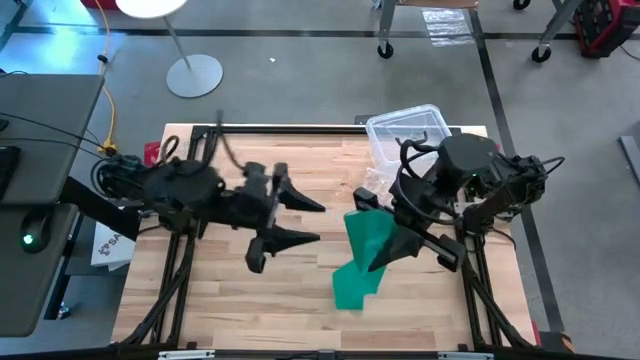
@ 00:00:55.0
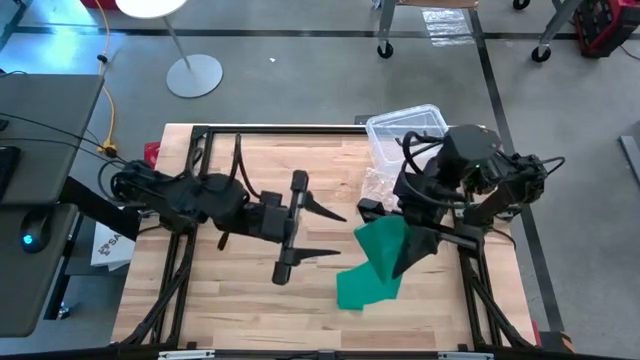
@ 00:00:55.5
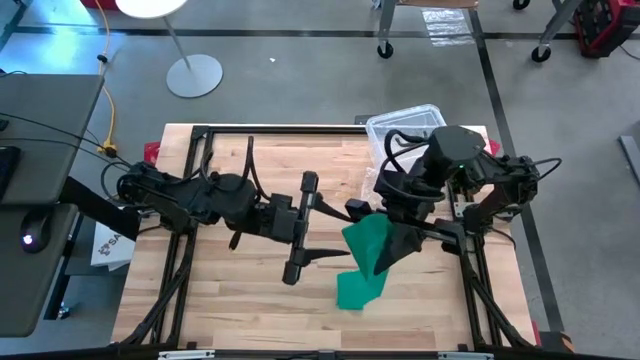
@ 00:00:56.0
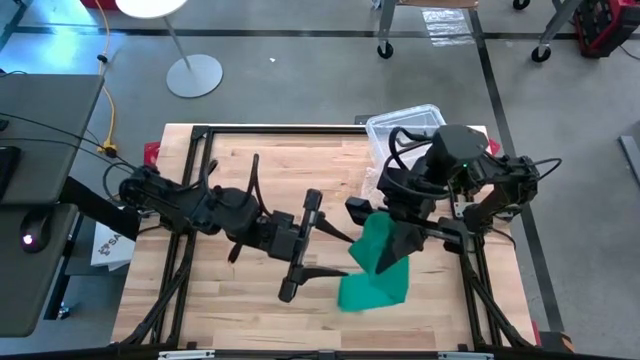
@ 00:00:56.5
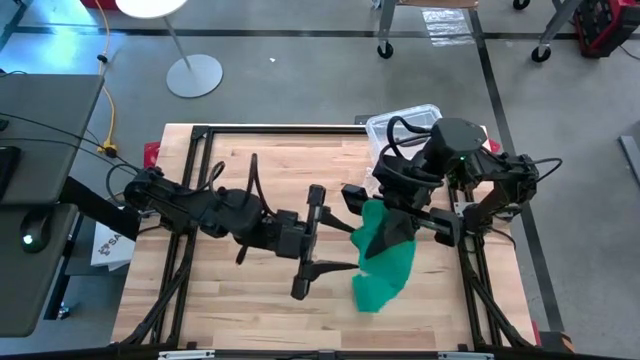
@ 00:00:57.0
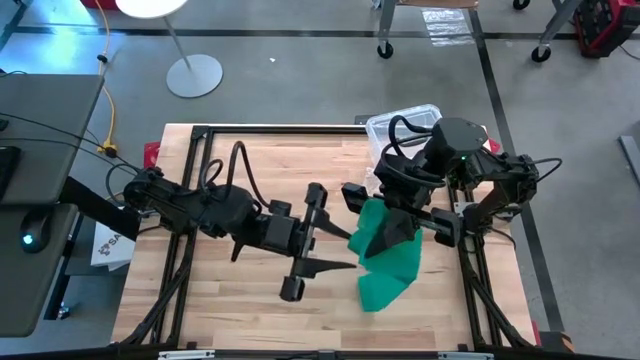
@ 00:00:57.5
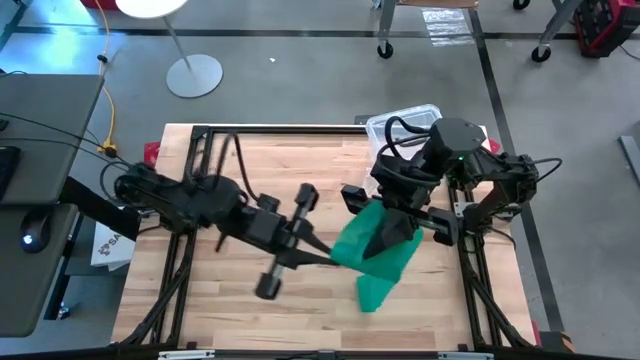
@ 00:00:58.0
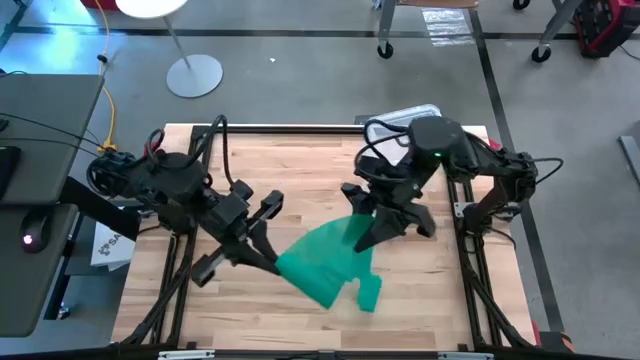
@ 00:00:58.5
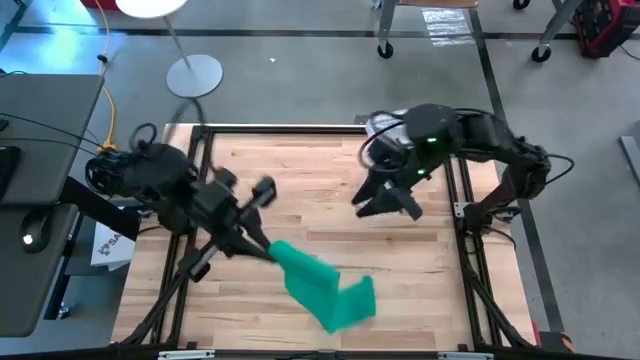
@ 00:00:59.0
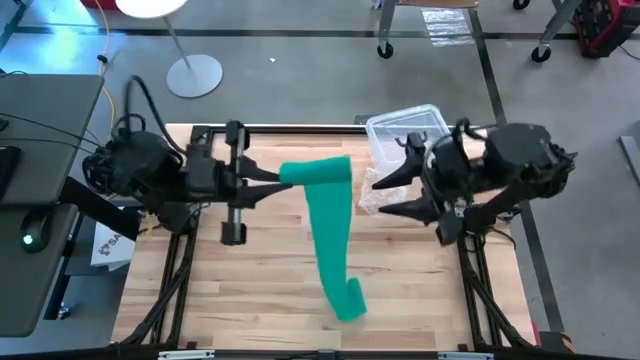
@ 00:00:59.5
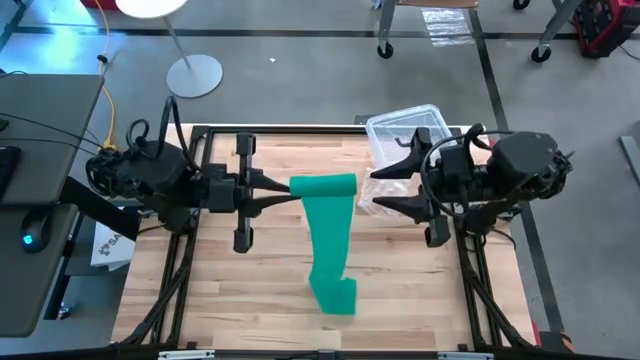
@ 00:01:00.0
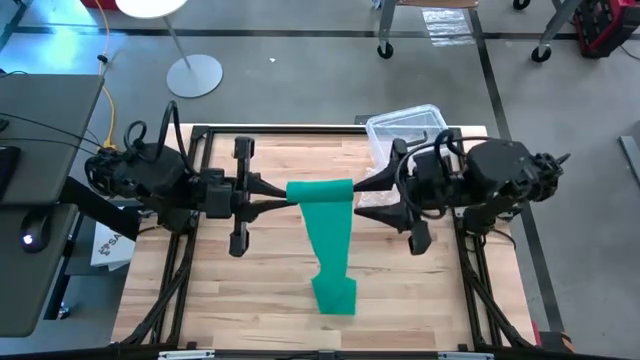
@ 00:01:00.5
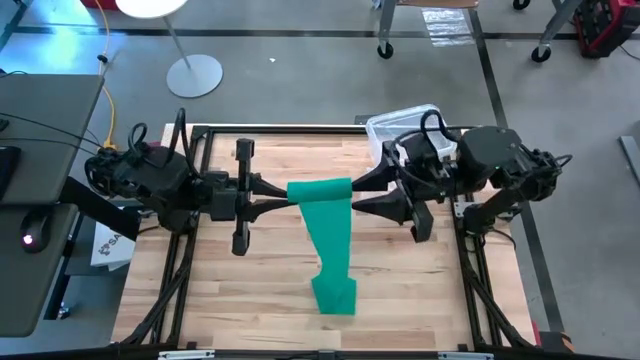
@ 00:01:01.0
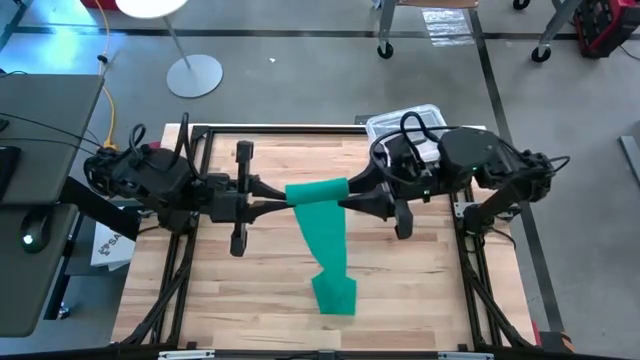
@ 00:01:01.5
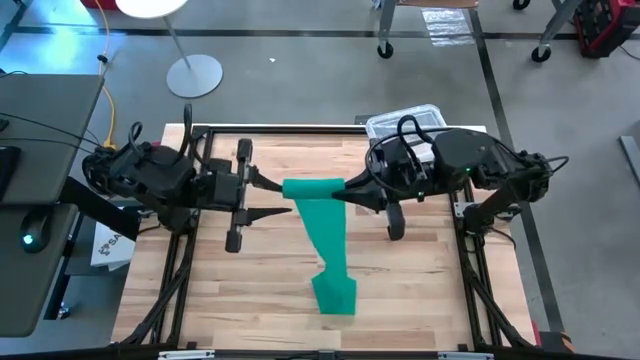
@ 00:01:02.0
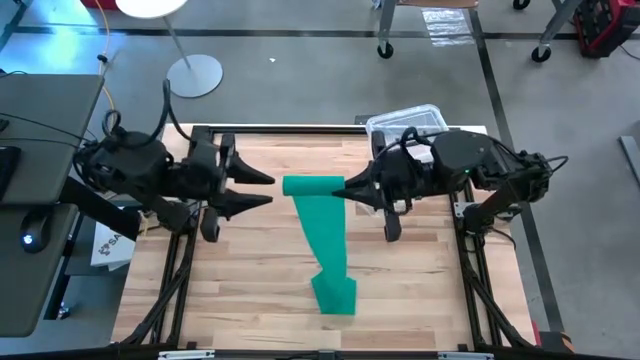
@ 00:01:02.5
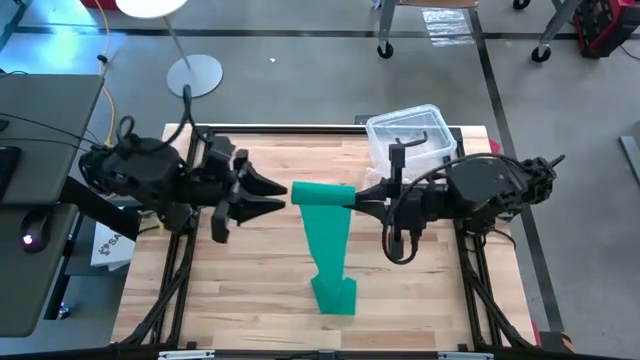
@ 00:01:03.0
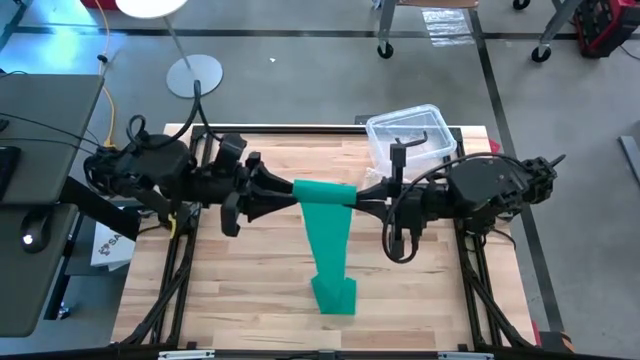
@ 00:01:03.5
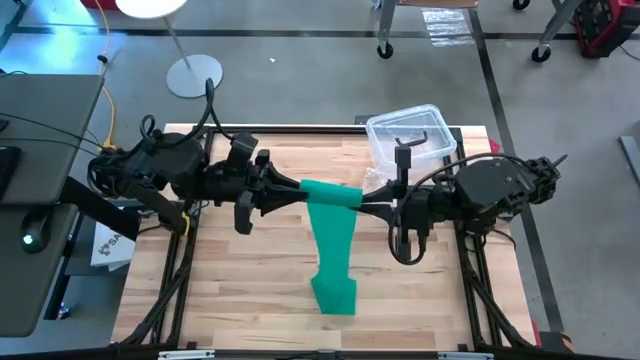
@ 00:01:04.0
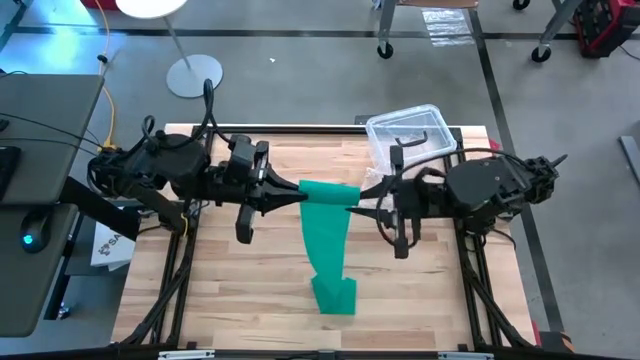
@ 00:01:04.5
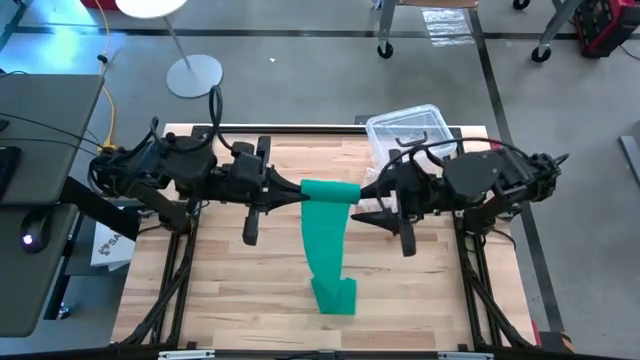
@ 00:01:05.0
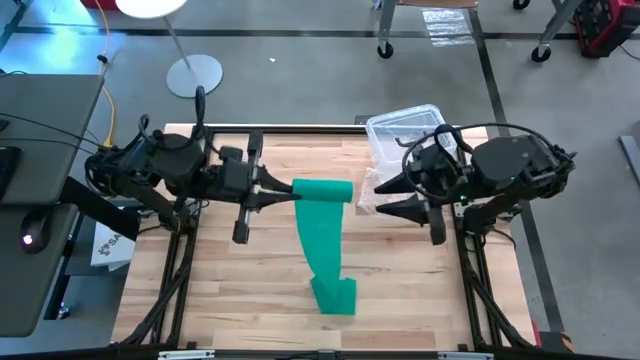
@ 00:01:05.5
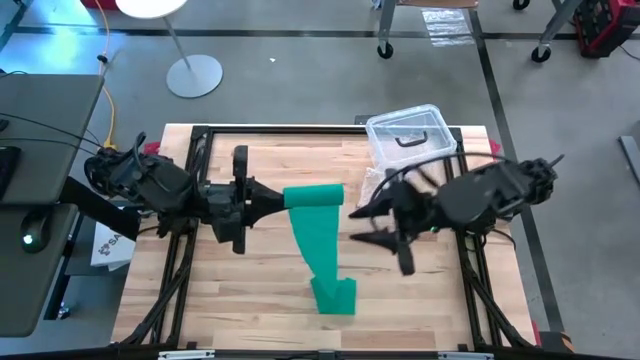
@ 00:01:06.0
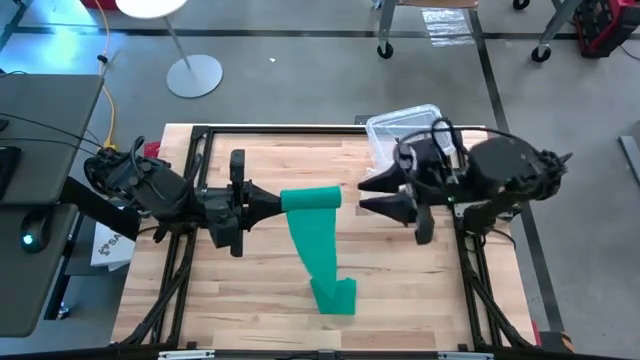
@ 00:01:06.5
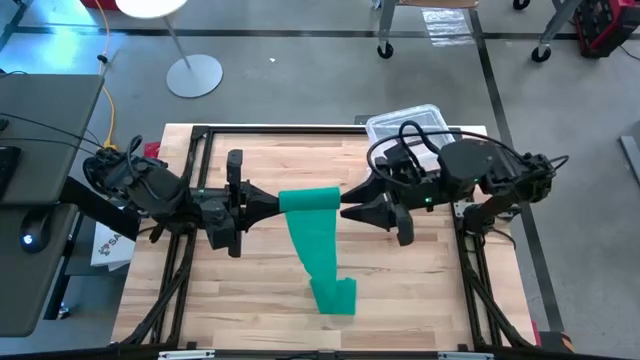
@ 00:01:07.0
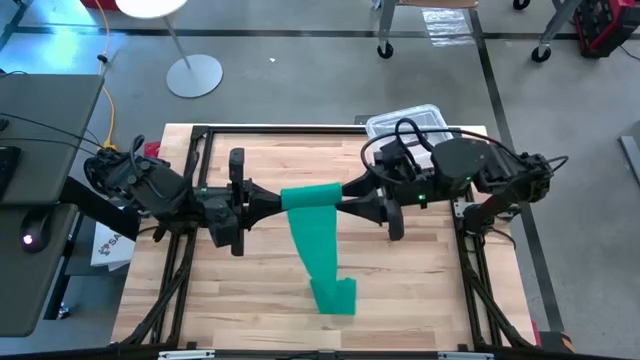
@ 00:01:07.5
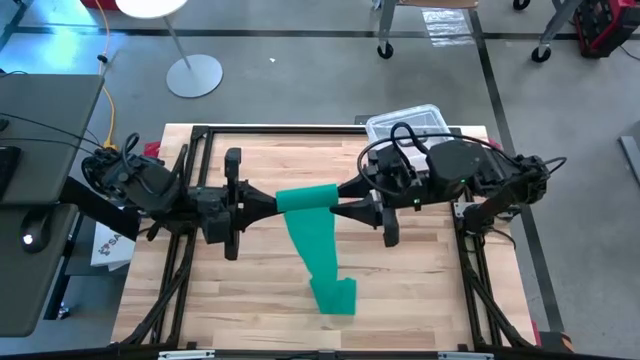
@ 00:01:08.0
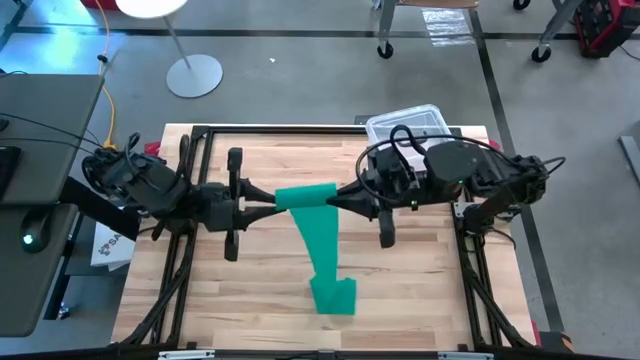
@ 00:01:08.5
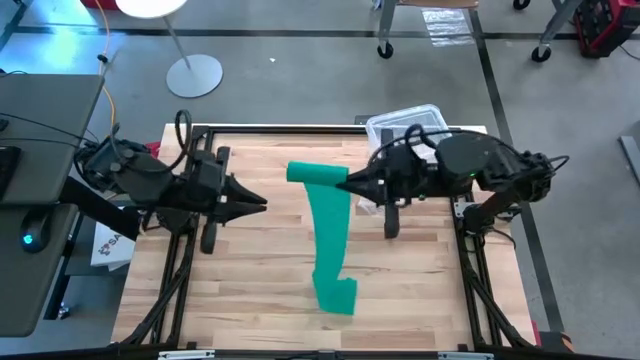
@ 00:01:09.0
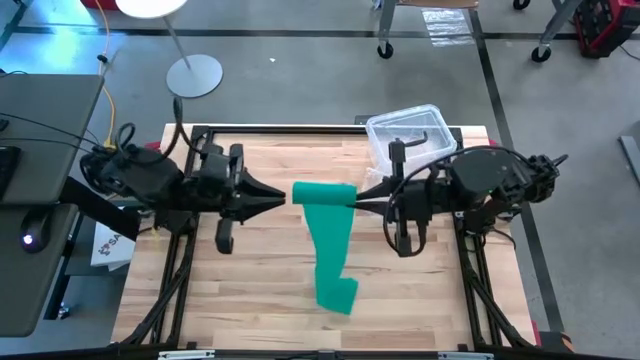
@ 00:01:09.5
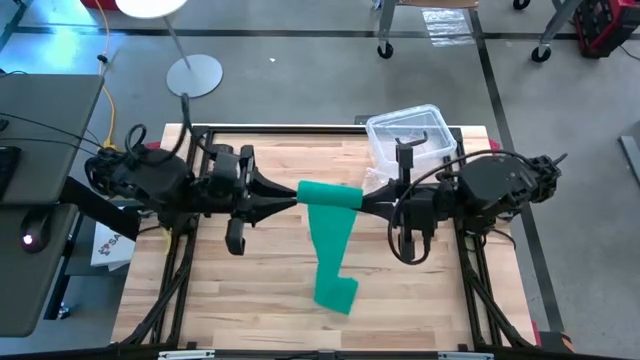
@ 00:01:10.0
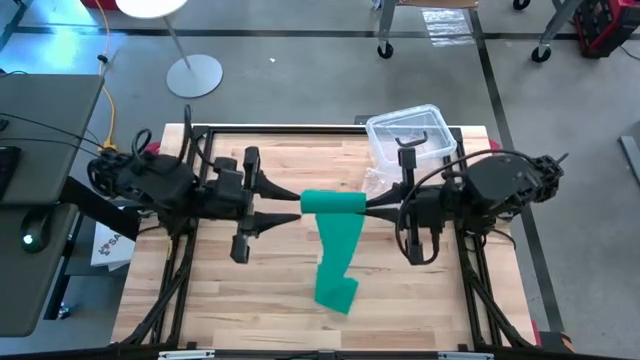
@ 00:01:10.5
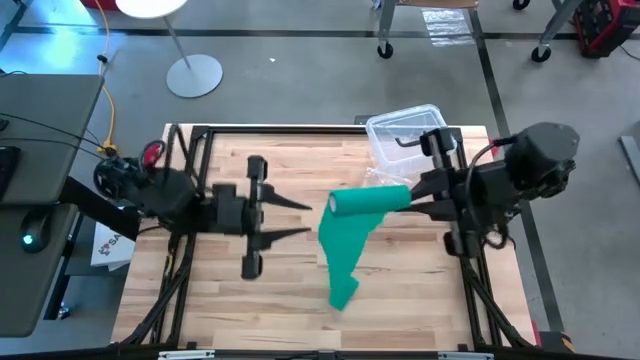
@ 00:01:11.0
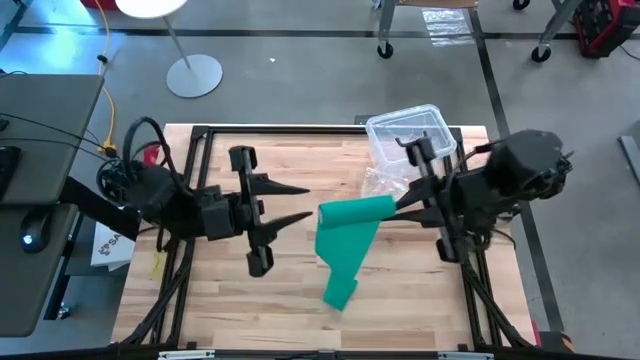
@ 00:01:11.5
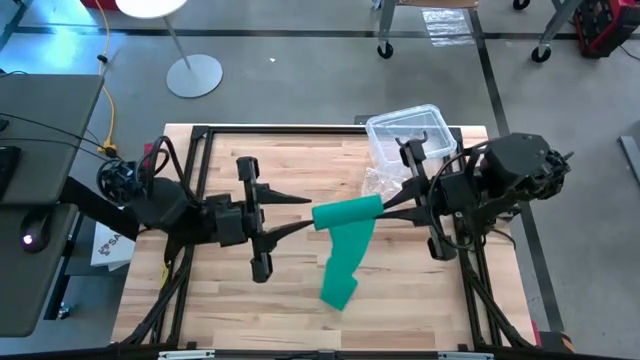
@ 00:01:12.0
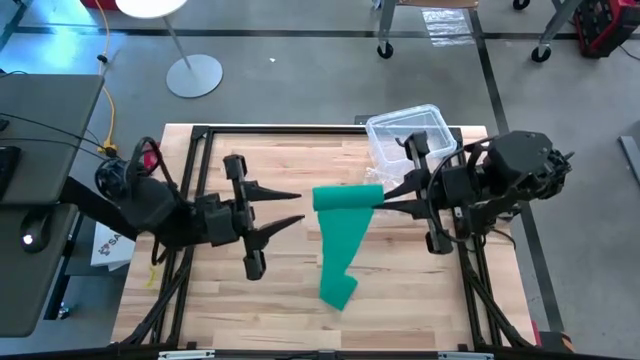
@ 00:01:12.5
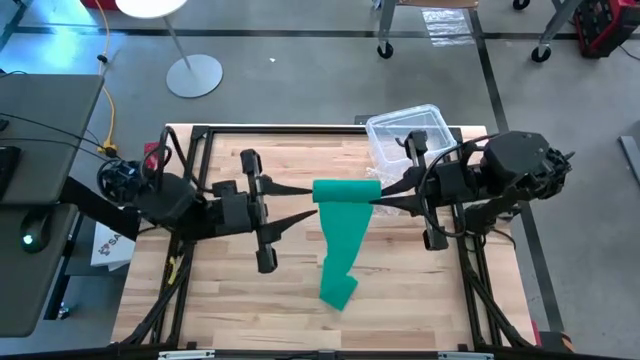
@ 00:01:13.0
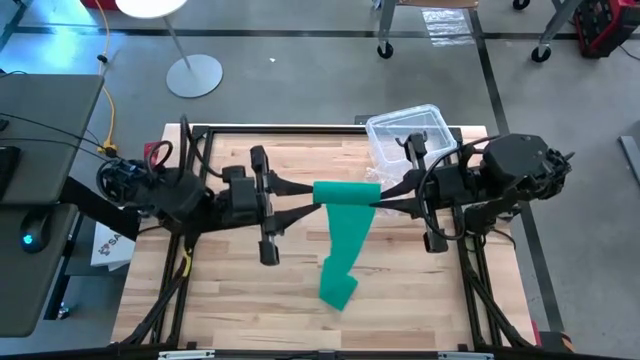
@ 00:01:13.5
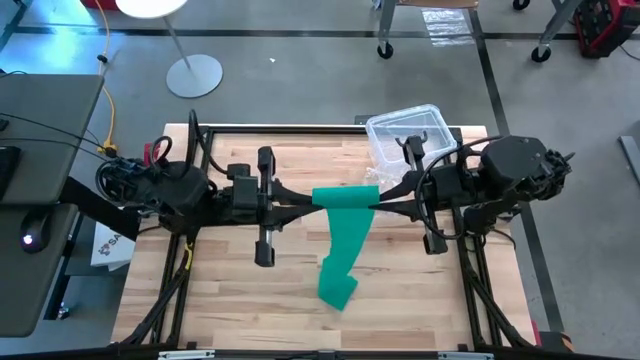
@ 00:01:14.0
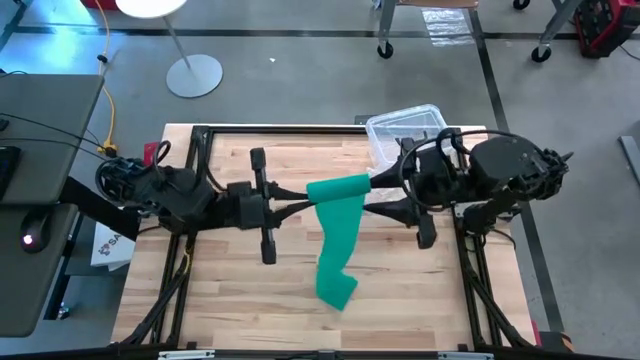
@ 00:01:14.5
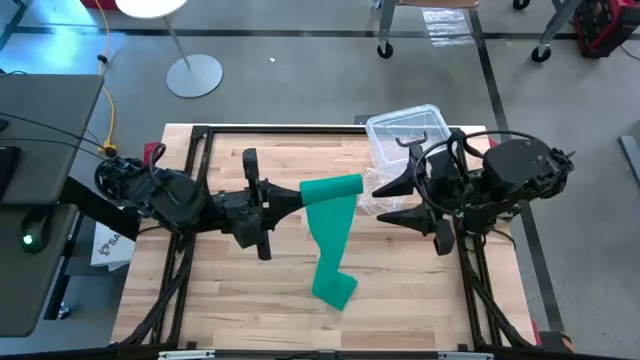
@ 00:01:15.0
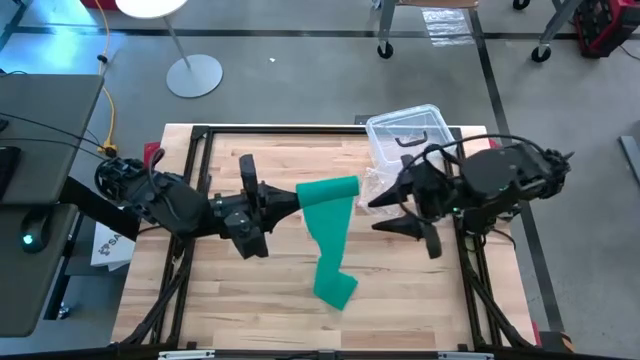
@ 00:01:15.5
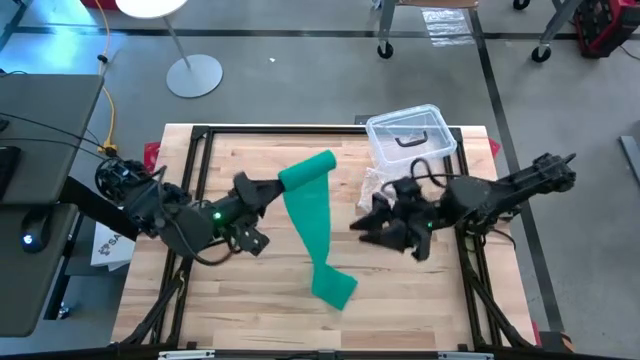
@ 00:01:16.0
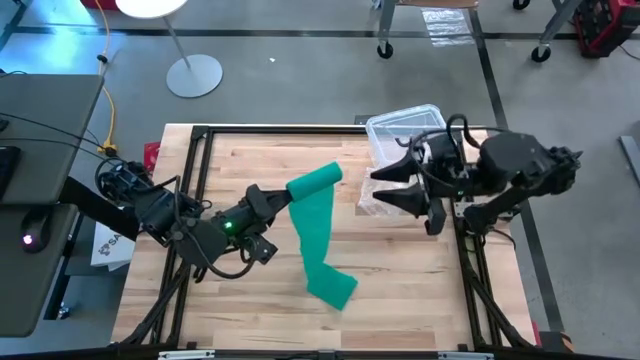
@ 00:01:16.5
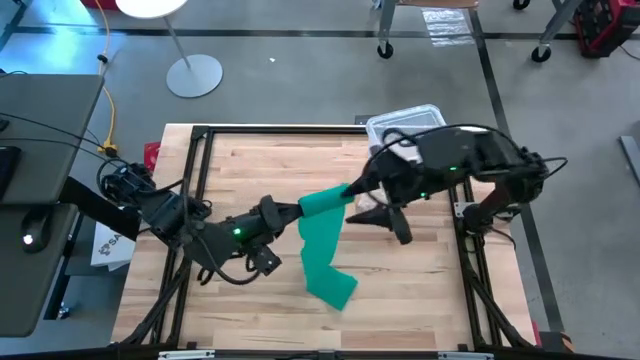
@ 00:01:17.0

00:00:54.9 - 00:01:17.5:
Task: Roll bandage
Roll the green bandage
